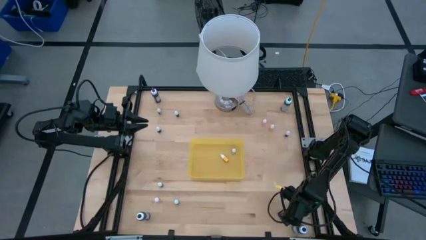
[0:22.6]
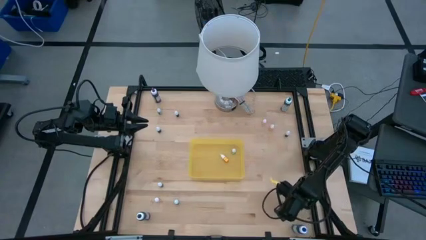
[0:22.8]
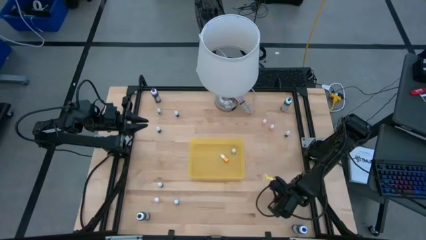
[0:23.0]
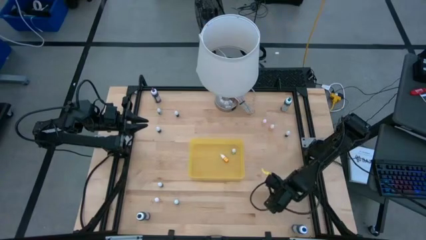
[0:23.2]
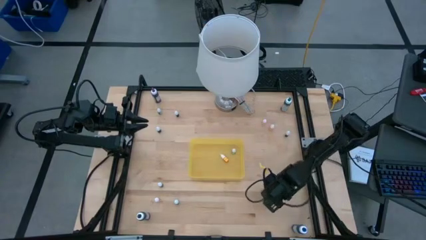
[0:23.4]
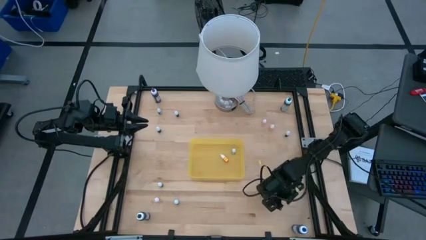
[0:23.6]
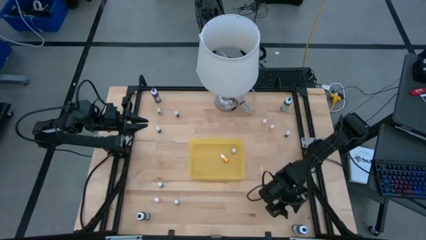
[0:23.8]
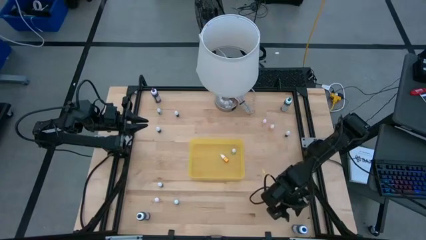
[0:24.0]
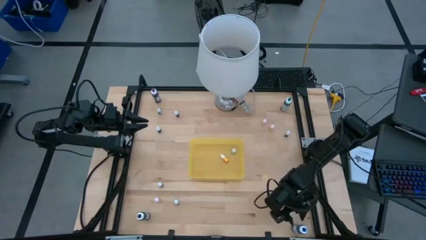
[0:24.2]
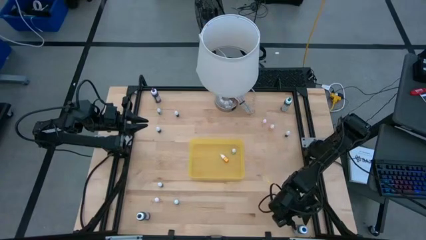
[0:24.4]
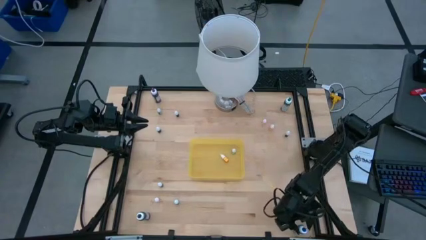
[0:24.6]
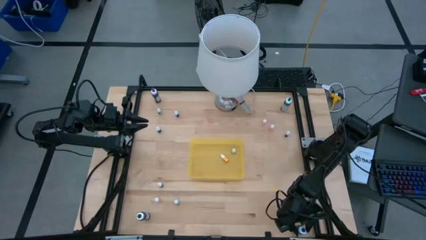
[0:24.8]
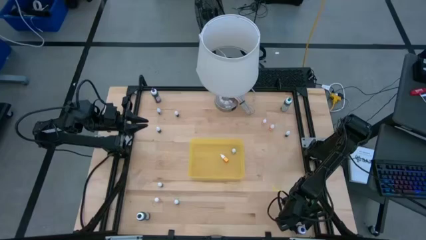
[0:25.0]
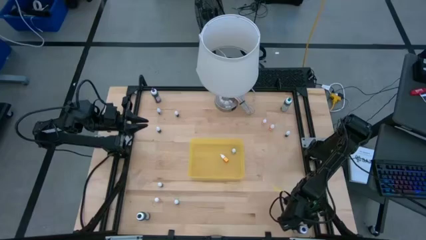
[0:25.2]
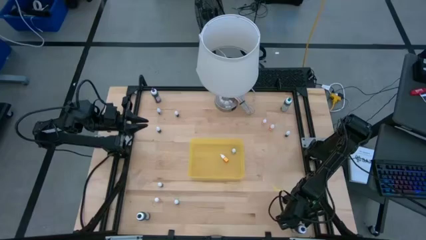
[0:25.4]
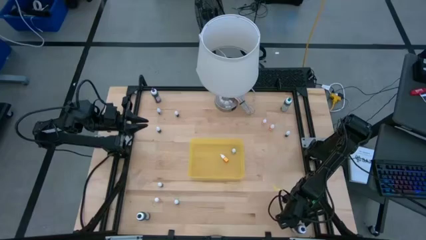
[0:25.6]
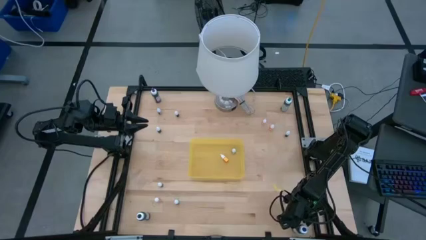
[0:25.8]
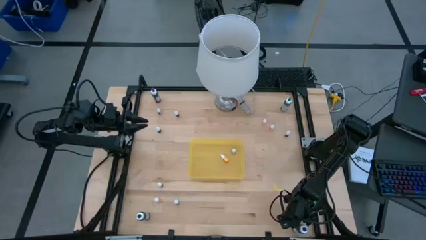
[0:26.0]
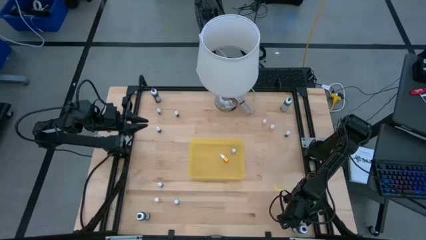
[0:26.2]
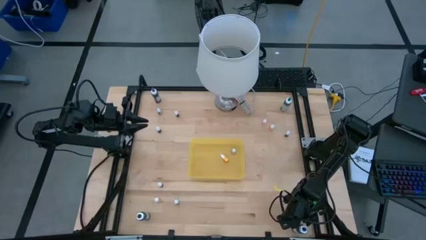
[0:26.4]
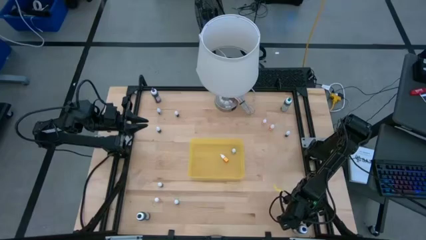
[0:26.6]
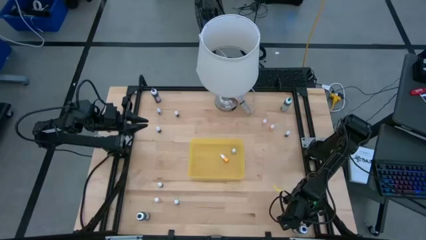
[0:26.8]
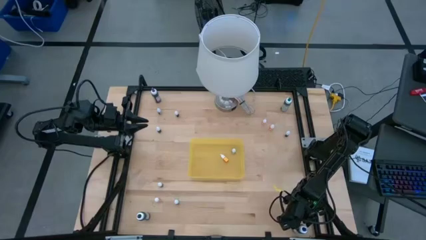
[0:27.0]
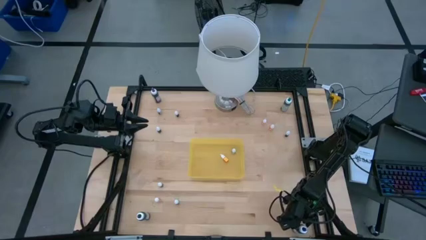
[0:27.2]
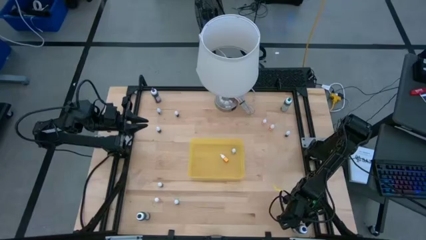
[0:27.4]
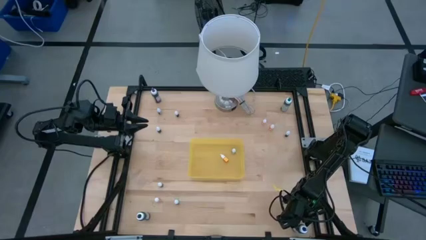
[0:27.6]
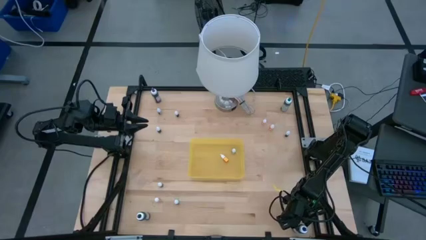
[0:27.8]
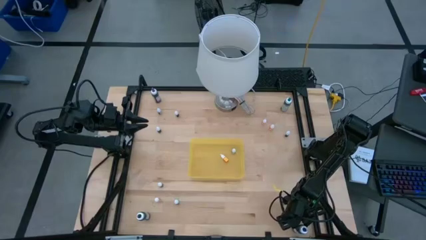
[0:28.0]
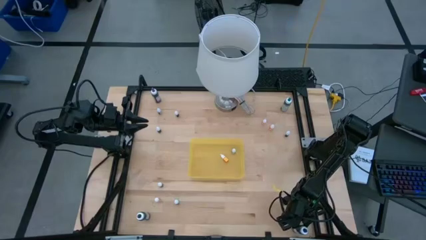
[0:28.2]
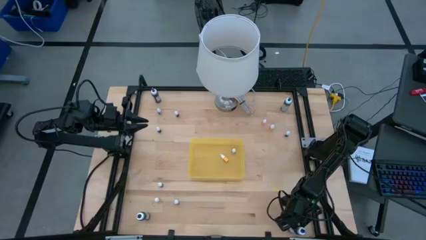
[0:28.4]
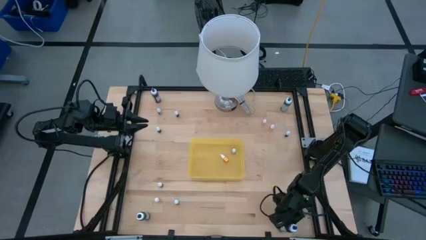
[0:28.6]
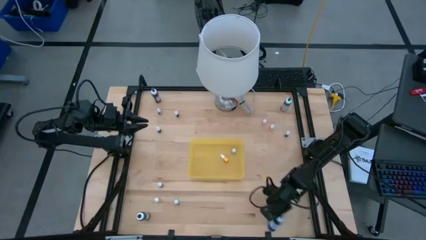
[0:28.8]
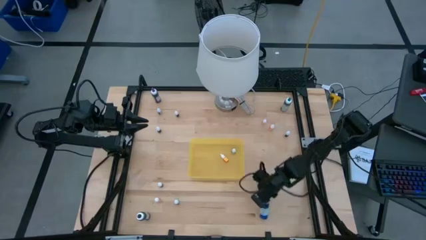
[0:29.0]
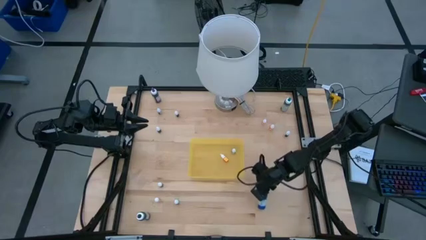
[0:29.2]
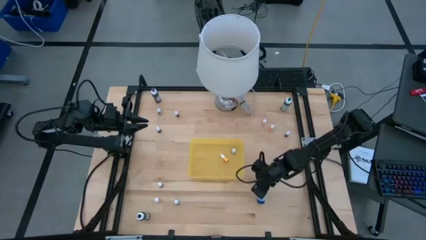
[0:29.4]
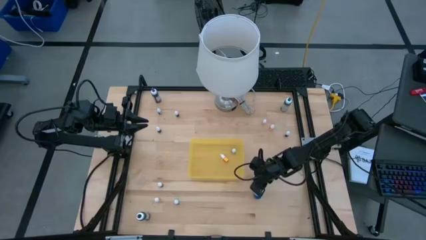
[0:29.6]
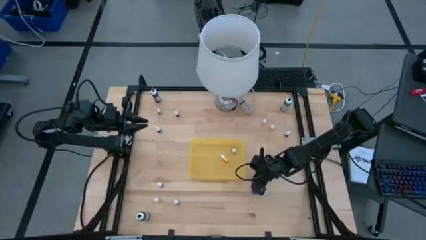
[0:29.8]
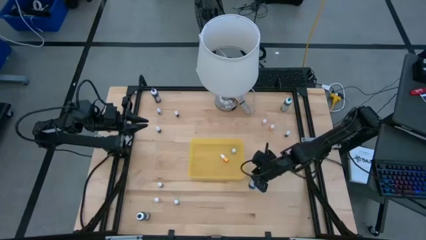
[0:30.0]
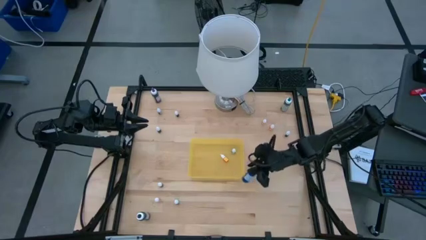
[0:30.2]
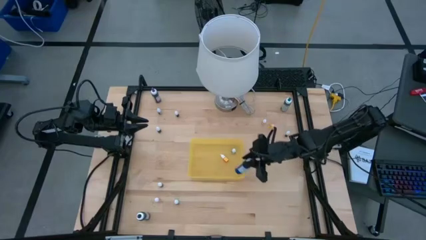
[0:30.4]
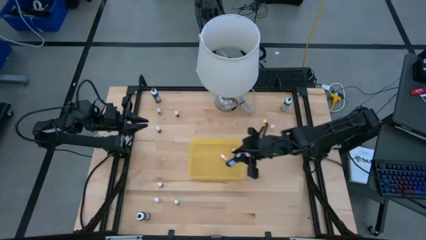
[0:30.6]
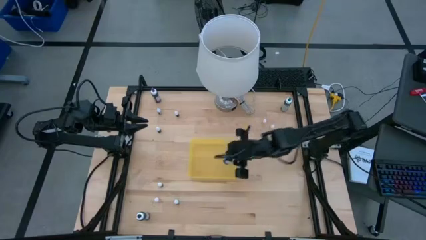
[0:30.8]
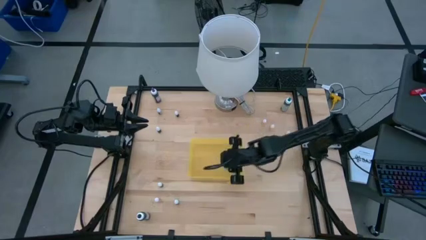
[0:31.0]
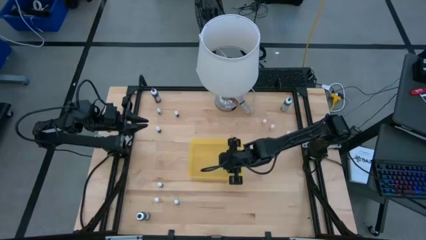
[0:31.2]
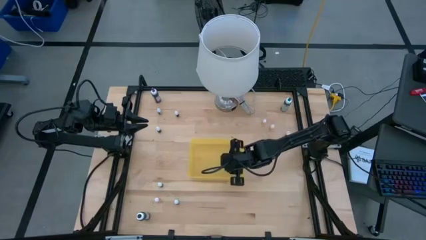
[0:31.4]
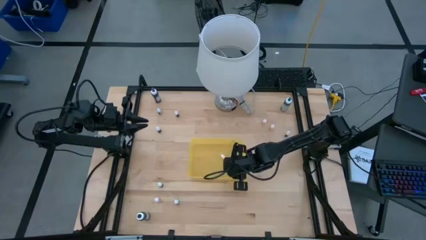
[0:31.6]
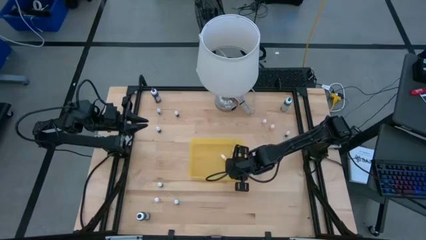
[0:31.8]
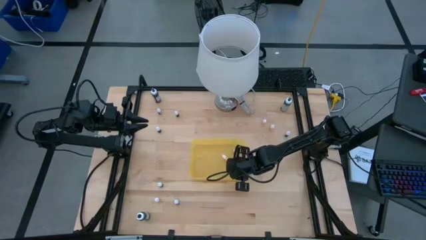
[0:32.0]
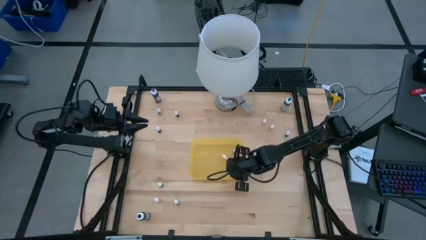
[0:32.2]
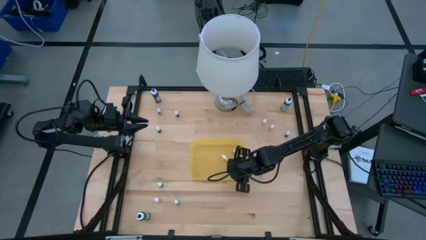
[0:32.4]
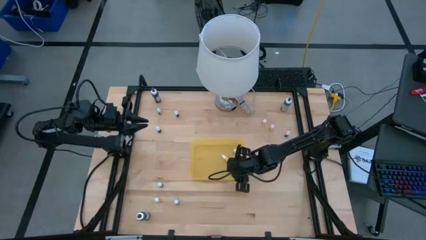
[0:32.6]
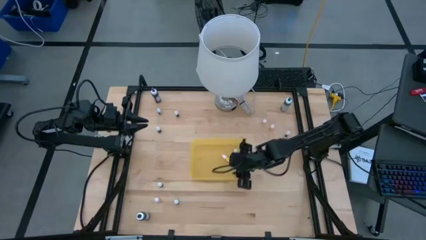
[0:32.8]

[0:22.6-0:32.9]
Task: Pick & Place food coloring
Put the blue food coloring bottle into the yellow bin
